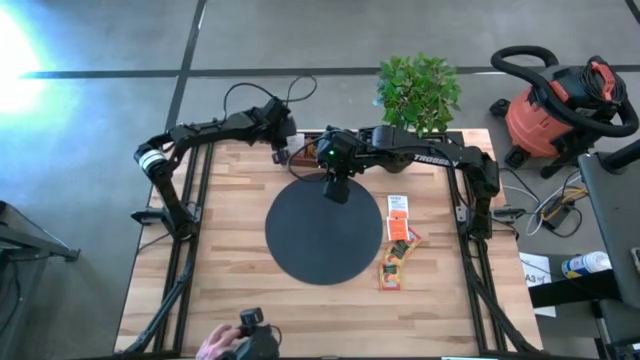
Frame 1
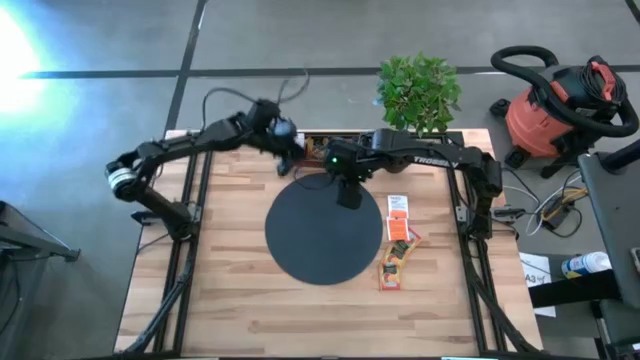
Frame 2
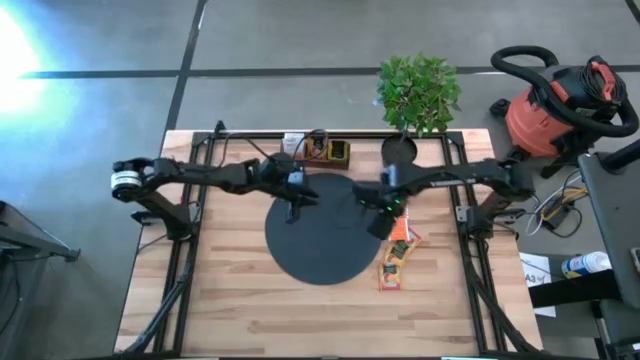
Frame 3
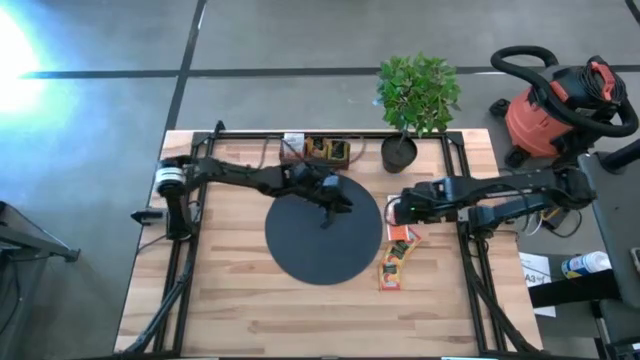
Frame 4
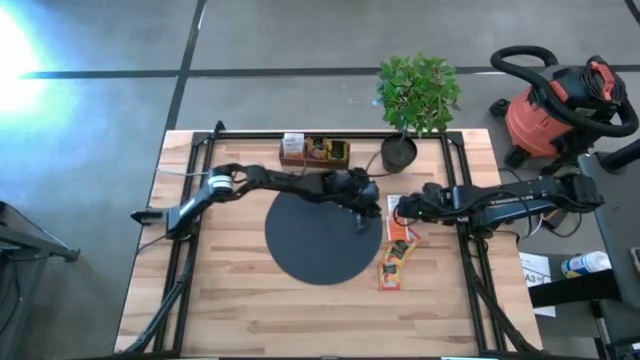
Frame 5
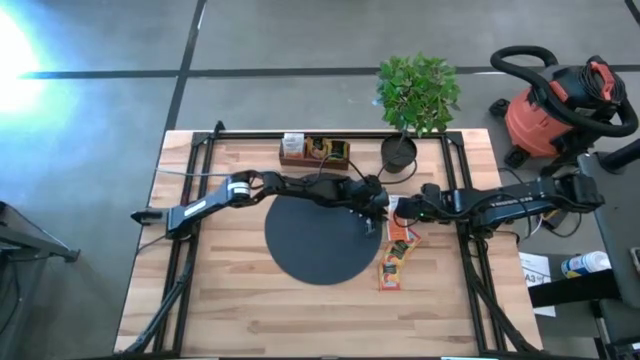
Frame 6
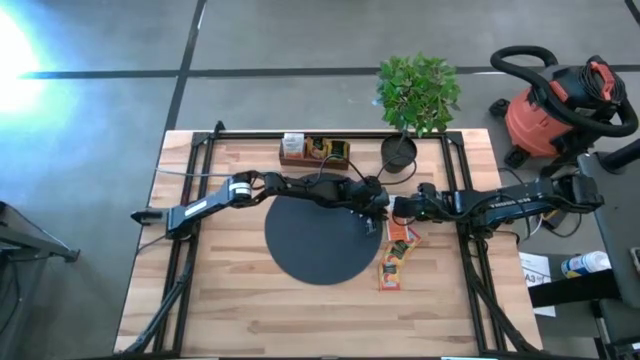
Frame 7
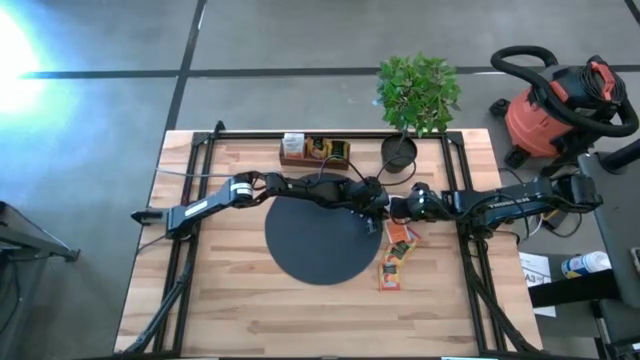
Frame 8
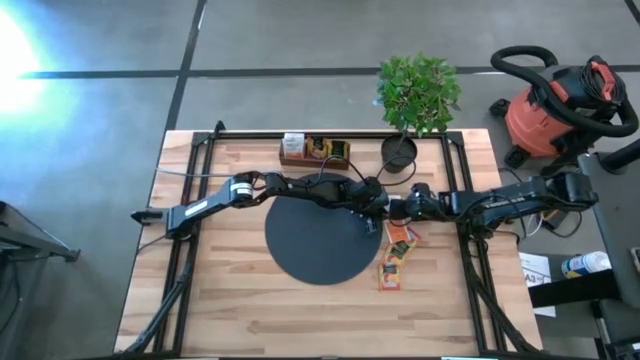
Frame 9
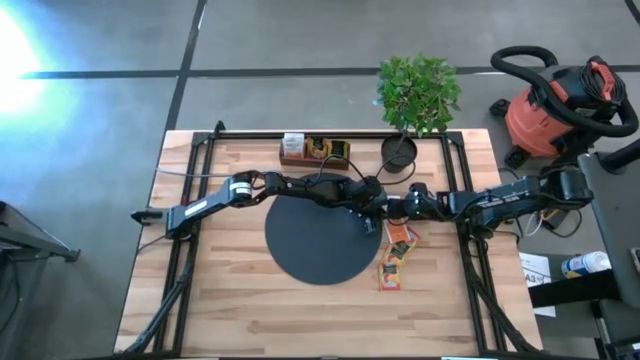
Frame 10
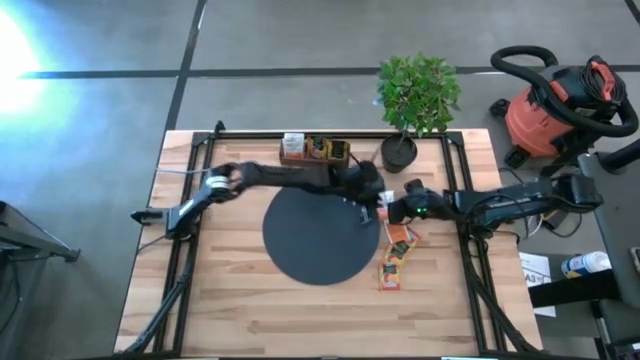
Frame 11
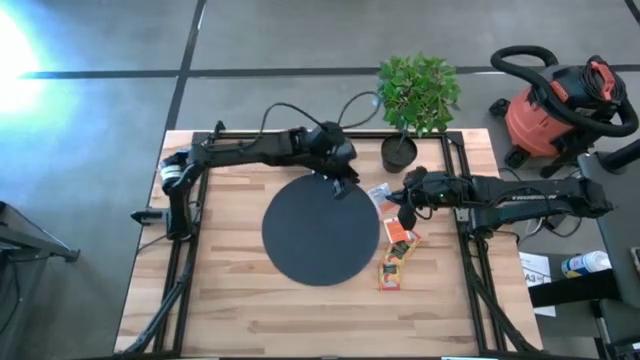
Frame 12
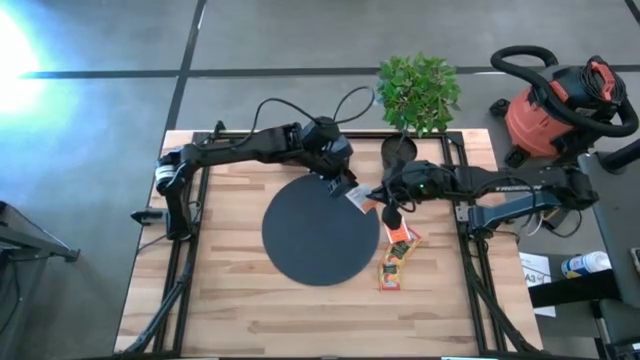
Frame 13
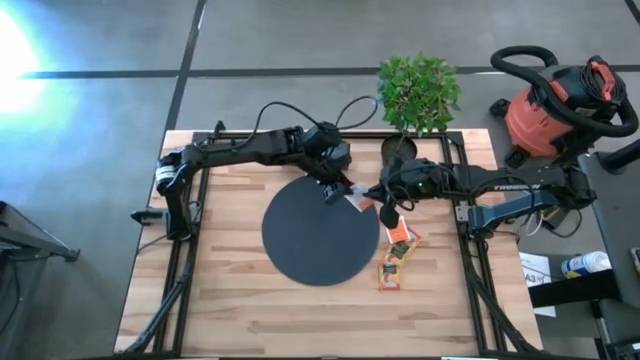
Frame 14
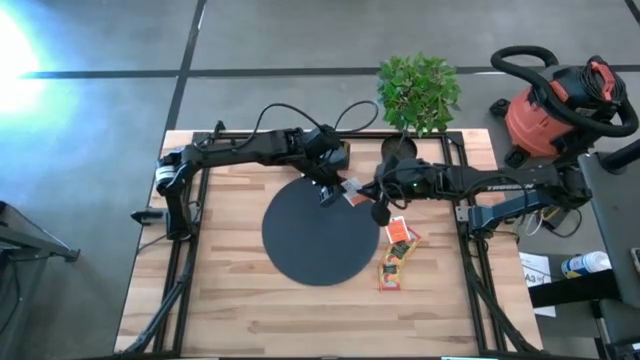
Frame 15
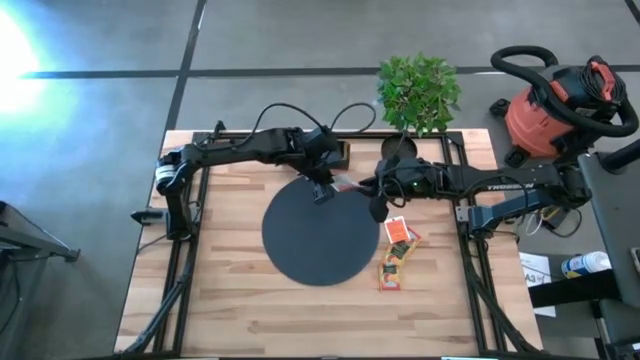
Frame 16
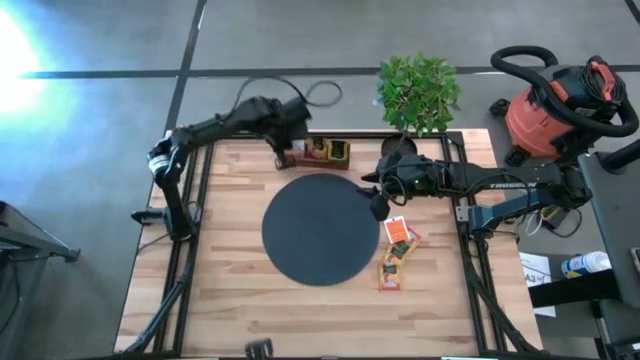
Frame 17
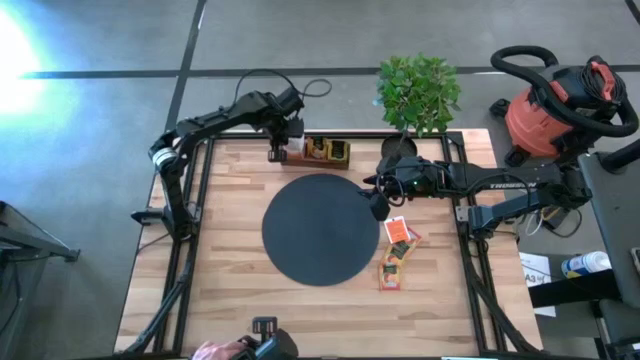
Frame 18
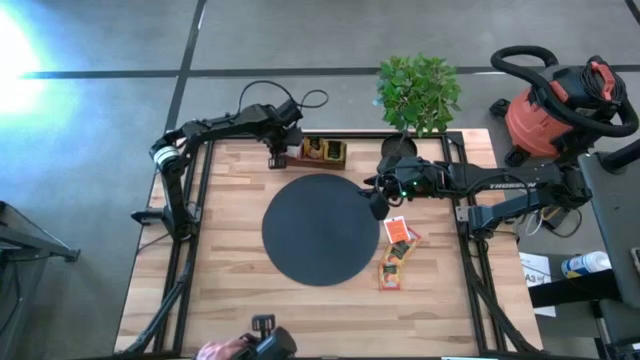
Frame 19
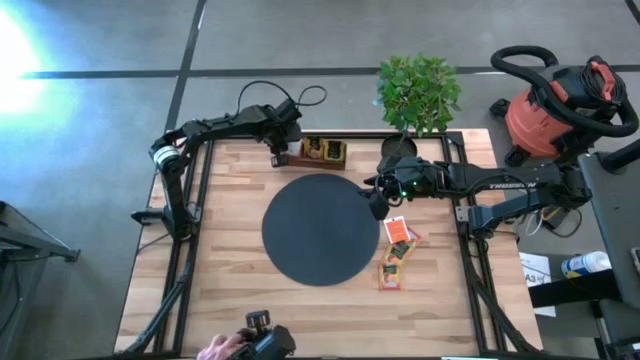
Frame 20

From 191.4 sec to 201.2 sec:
Task: Pick & Place Tea
Put the white tea bag into the left section of the brown wooden organizer

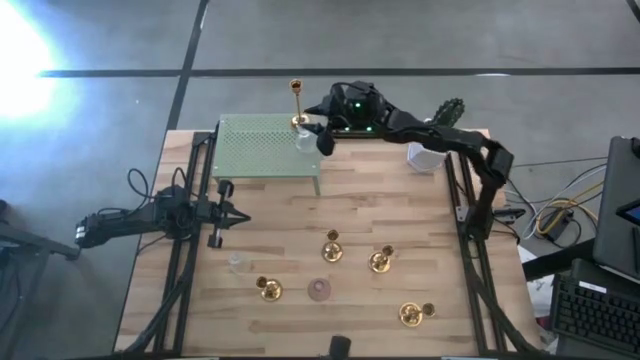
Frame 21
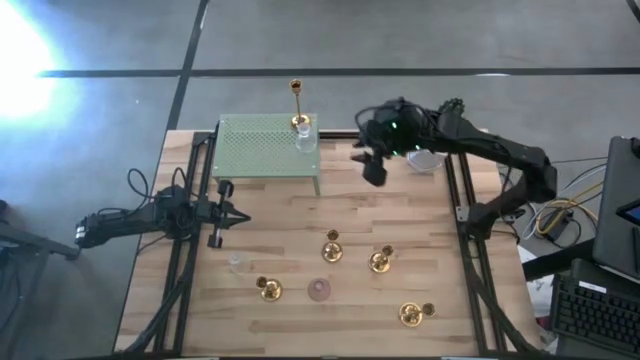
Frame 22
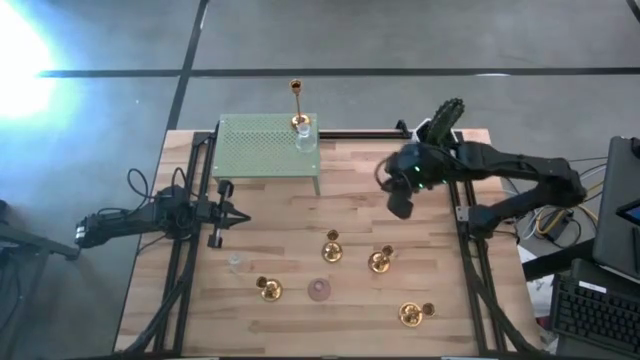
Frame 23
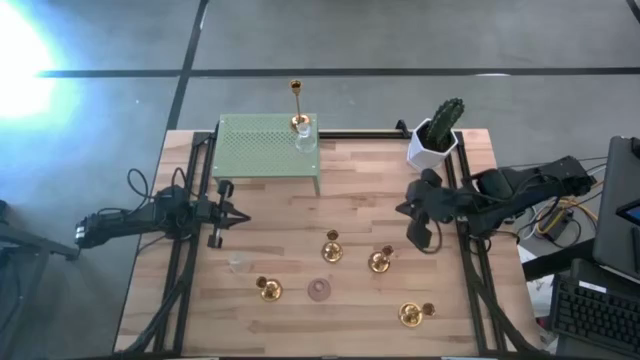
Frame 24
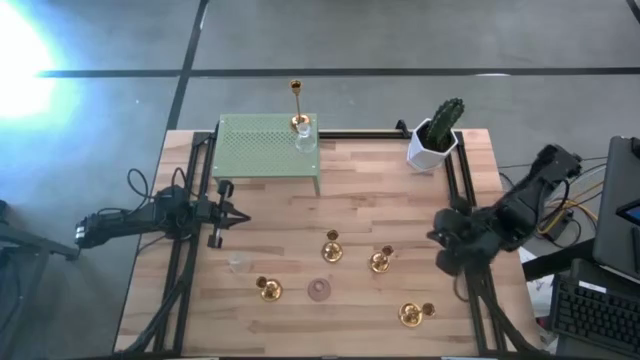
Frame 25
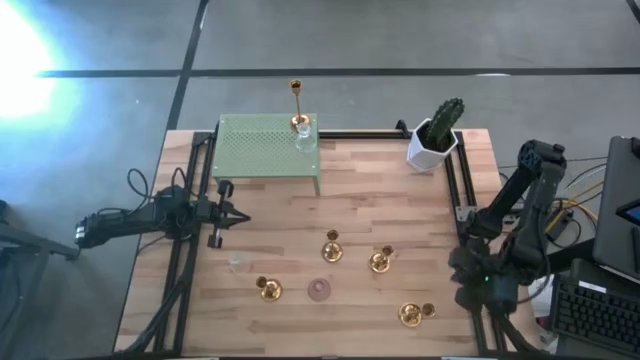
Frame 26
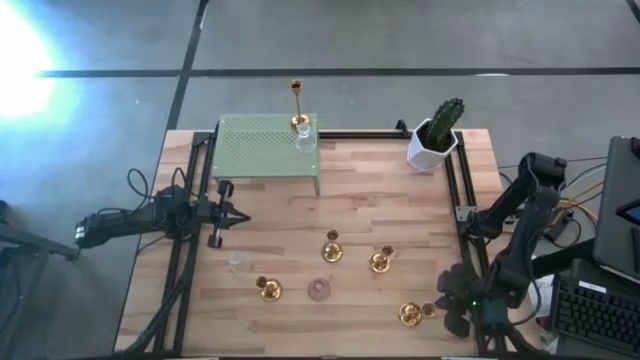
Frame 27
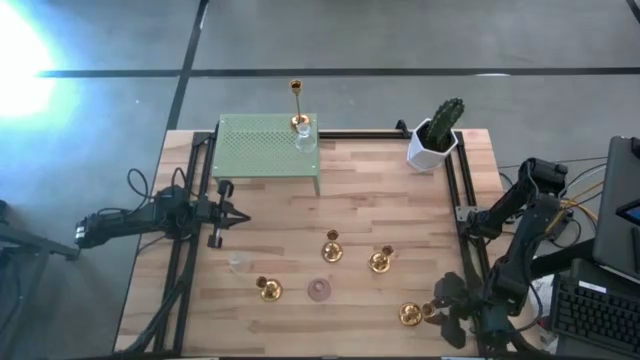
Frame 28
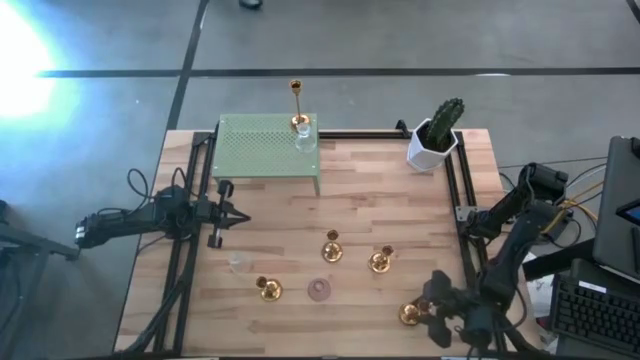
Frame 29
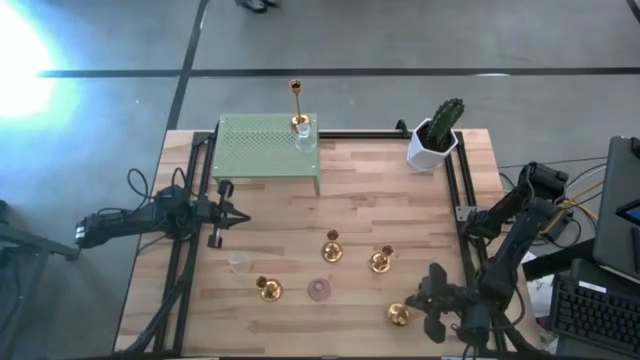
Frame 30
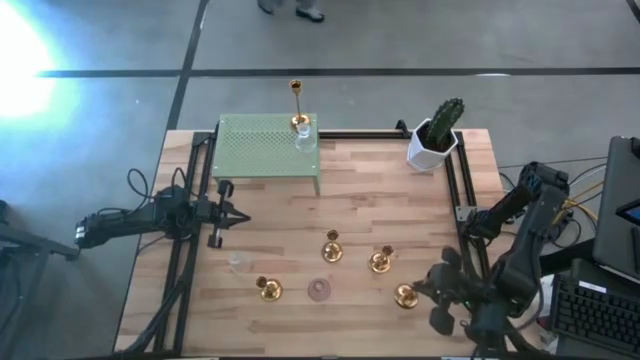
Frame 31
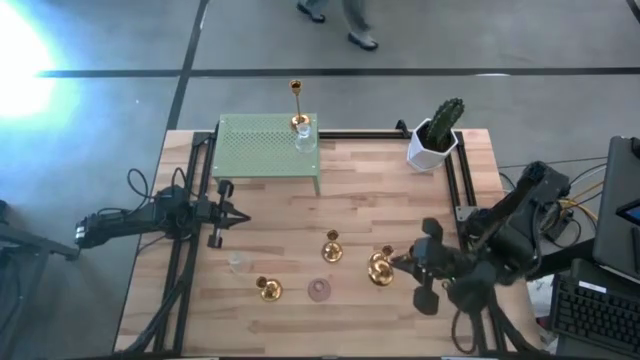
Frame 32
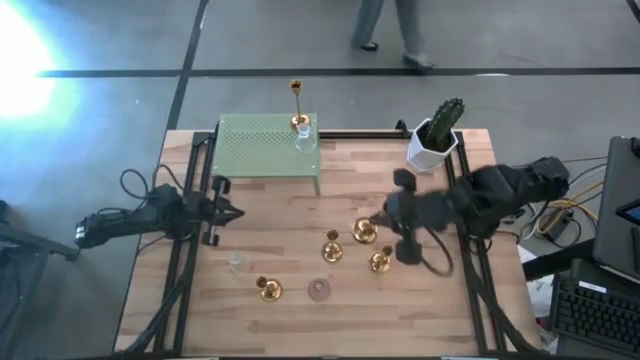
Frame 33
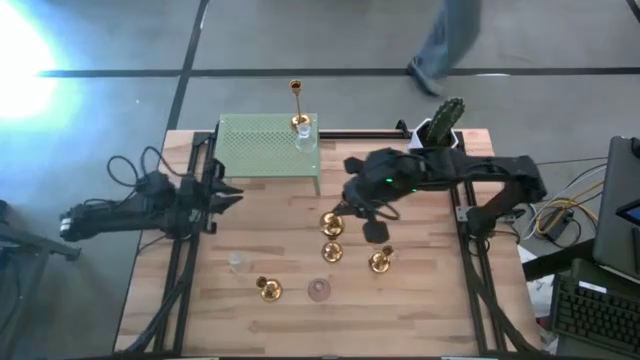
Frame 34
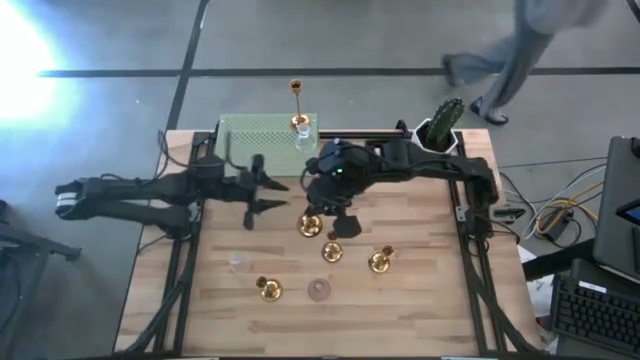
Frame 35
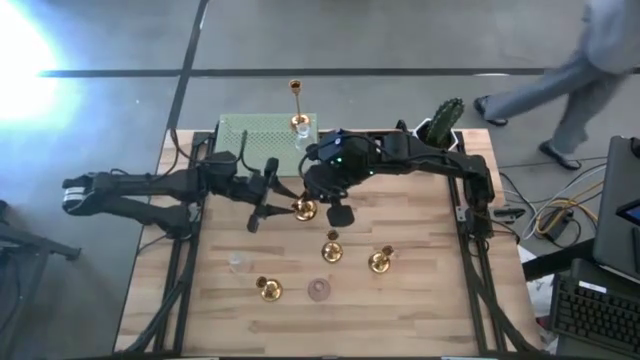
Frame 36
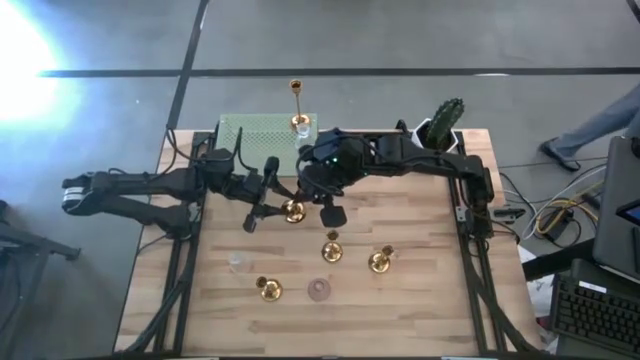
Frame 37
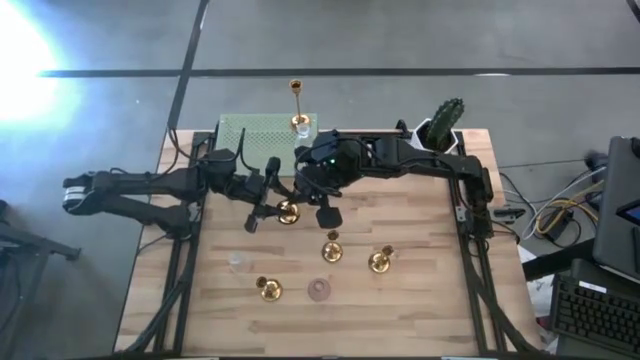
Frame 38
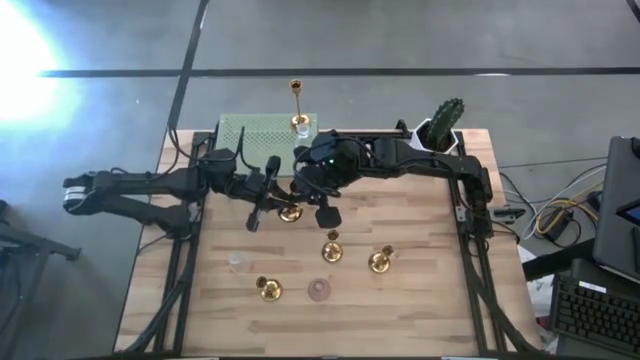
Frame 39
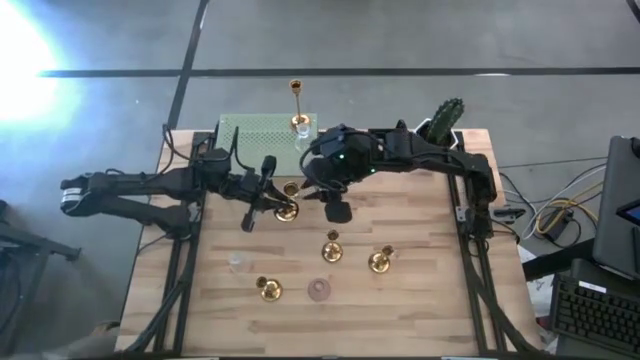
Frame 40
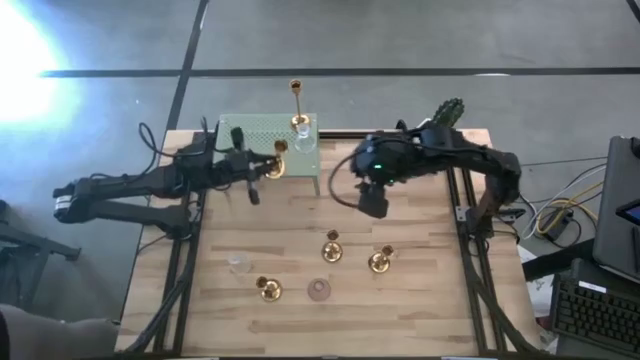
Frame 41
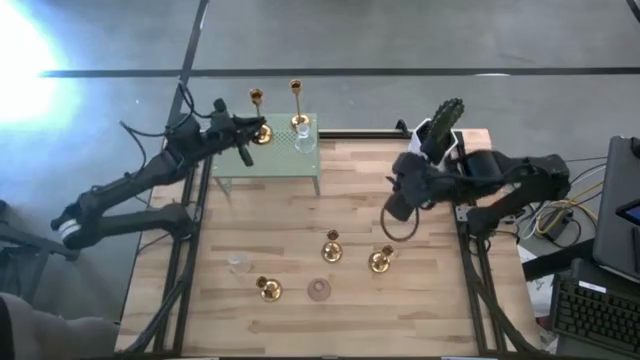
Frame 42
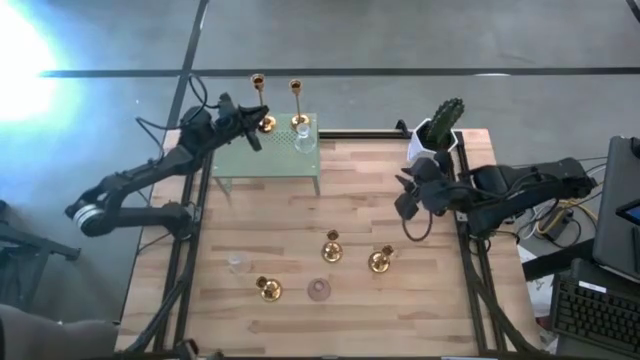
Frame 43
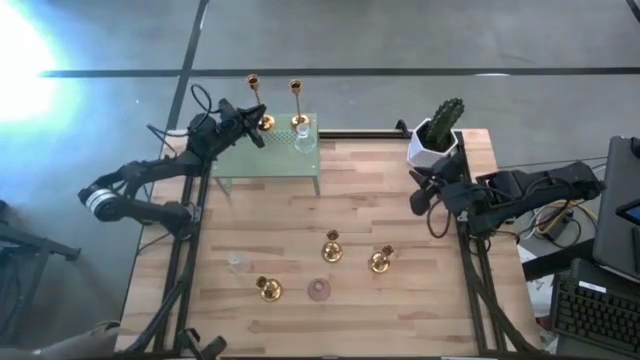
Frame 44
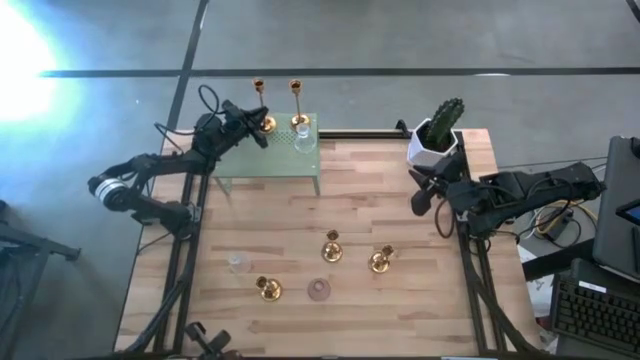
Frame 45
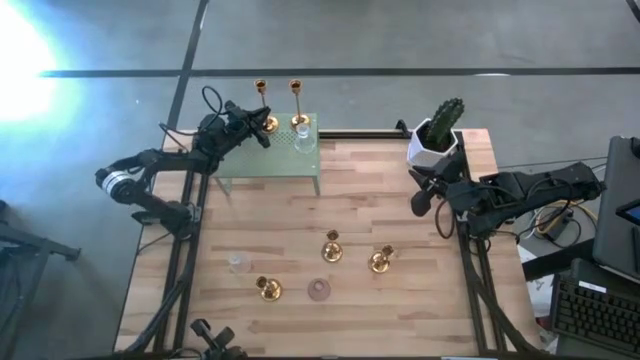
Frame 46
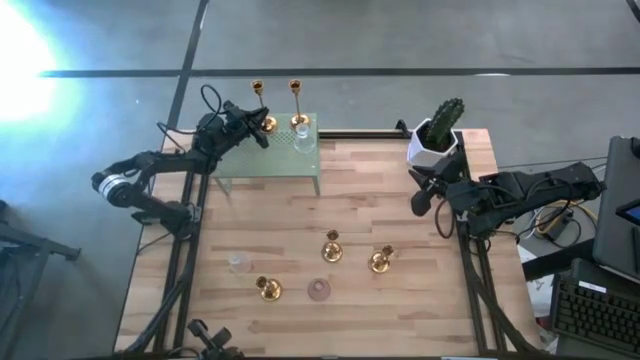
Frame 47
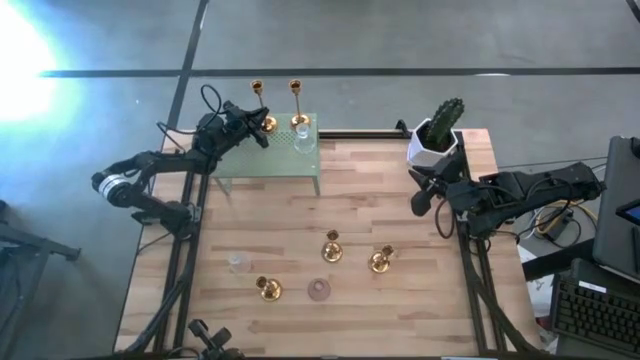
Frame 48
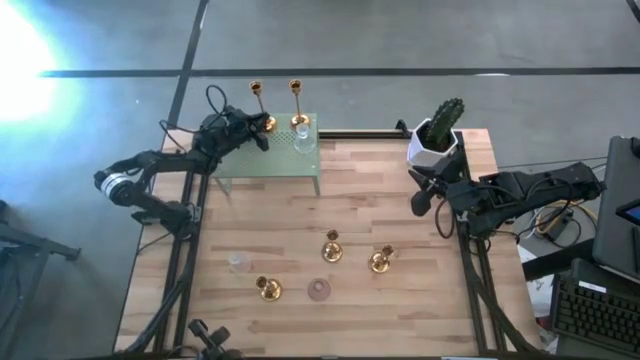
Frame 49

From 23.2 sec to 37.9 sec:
Task: Pick & Place candle stick holders
Put the golden candle holder on the shelf
